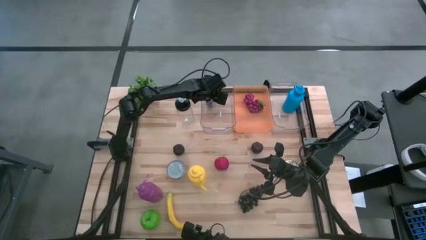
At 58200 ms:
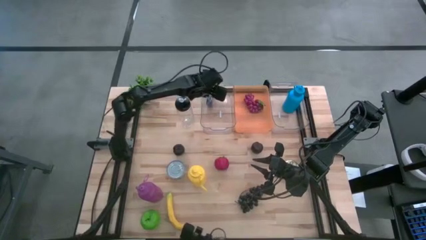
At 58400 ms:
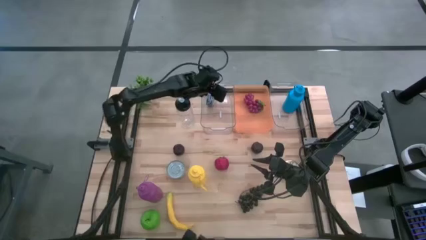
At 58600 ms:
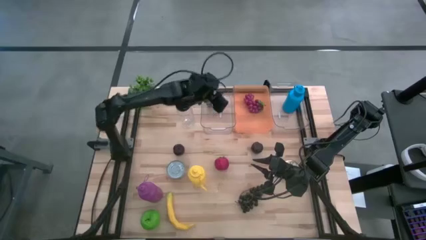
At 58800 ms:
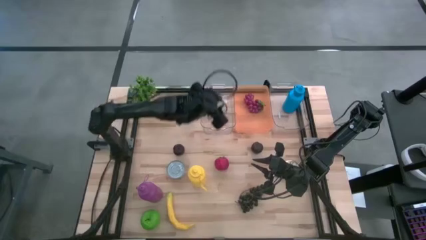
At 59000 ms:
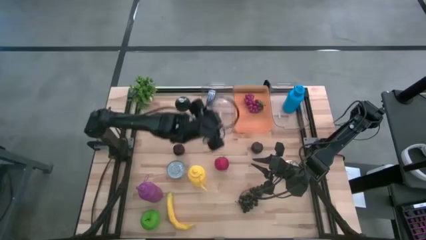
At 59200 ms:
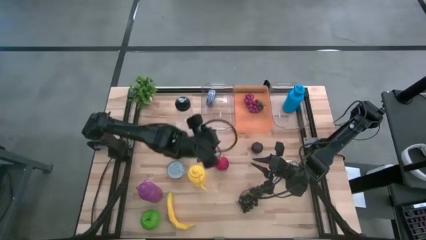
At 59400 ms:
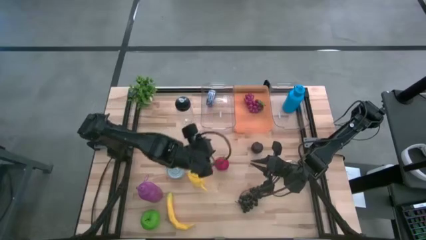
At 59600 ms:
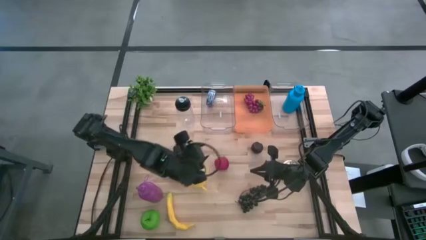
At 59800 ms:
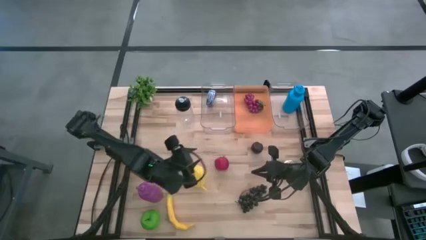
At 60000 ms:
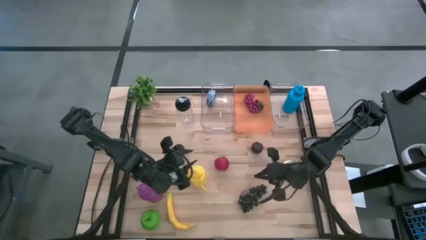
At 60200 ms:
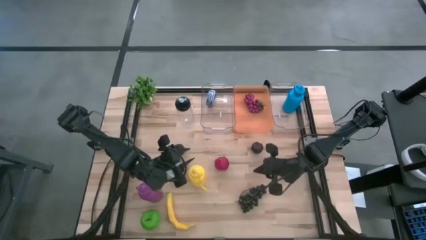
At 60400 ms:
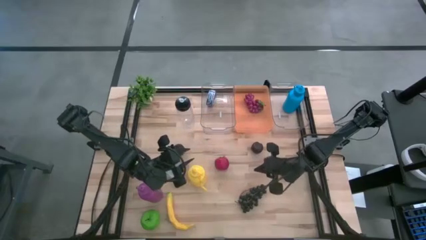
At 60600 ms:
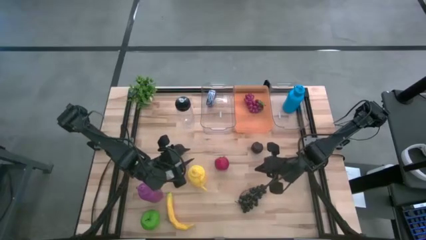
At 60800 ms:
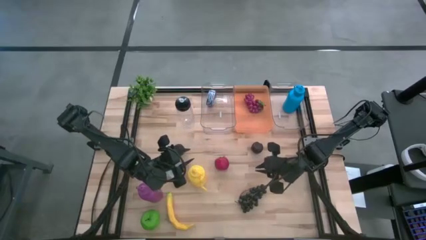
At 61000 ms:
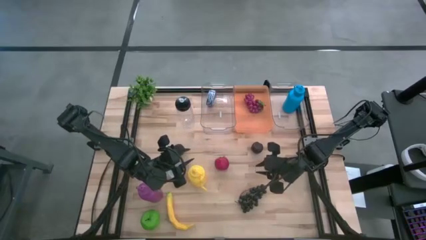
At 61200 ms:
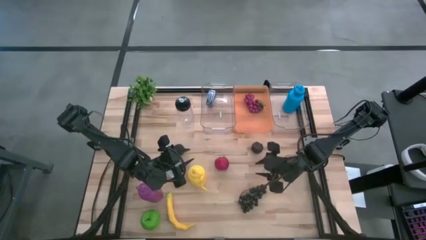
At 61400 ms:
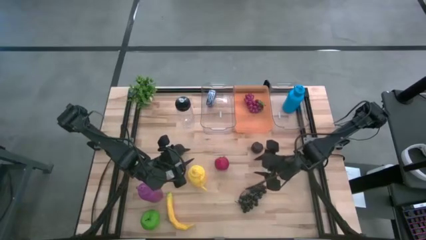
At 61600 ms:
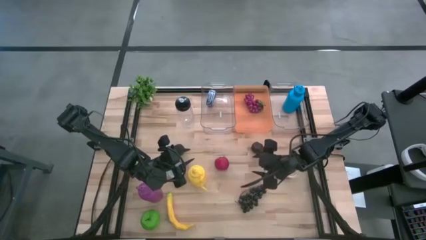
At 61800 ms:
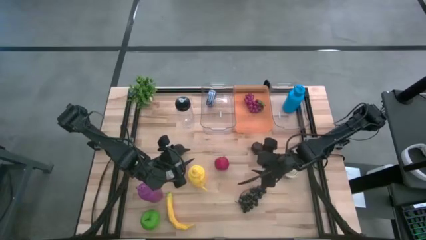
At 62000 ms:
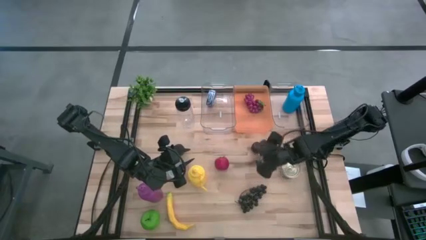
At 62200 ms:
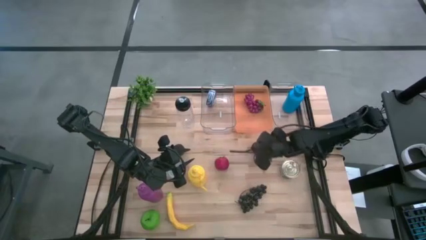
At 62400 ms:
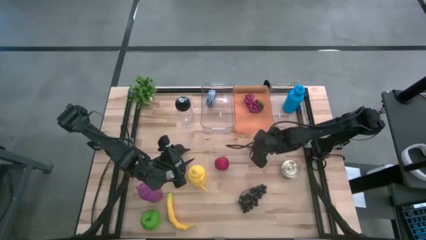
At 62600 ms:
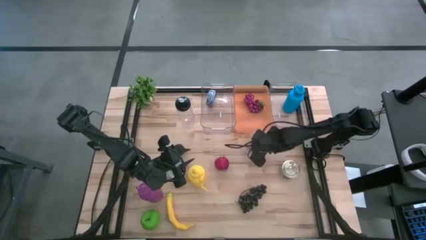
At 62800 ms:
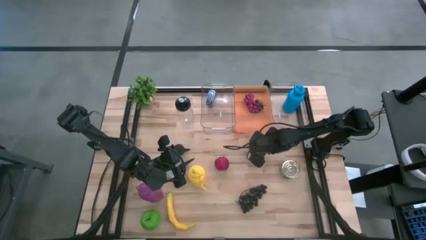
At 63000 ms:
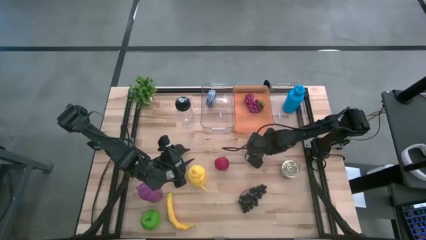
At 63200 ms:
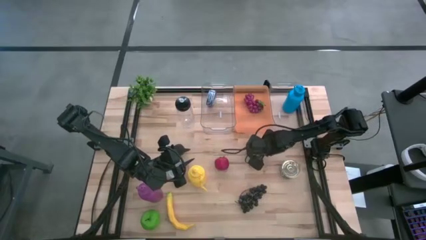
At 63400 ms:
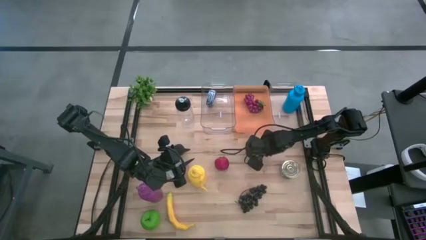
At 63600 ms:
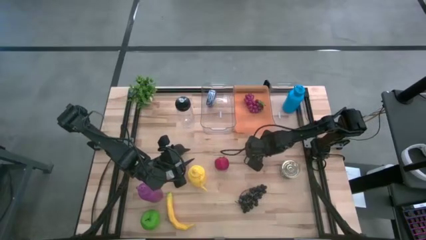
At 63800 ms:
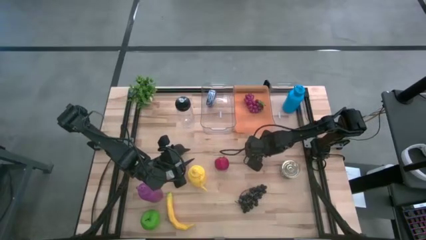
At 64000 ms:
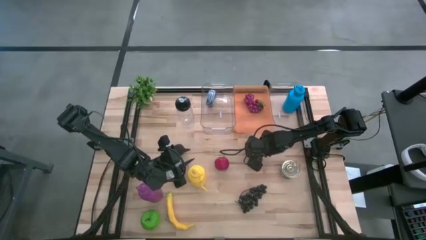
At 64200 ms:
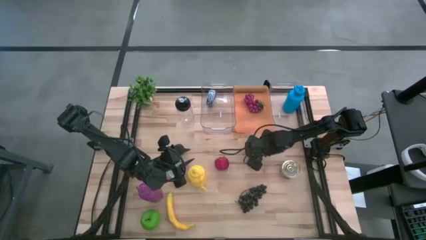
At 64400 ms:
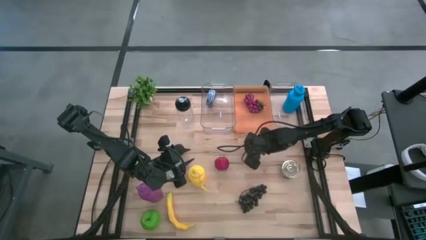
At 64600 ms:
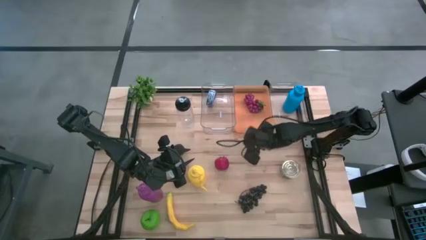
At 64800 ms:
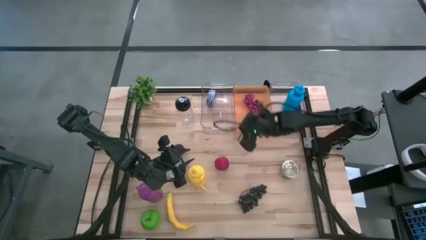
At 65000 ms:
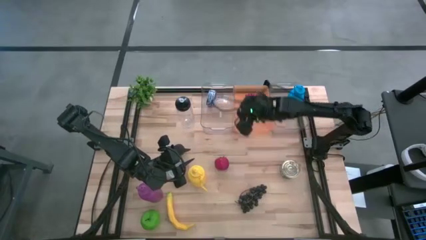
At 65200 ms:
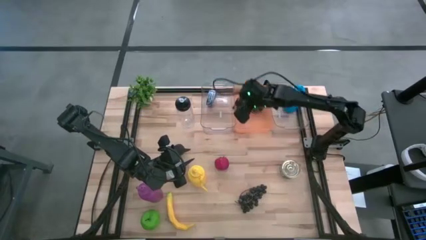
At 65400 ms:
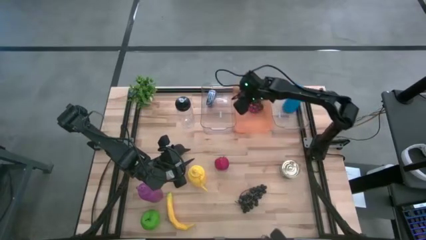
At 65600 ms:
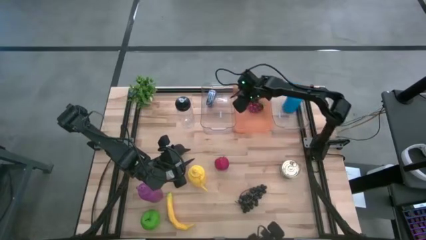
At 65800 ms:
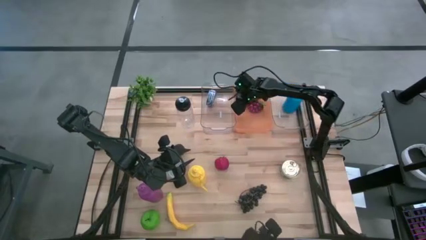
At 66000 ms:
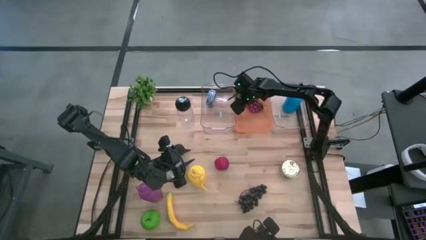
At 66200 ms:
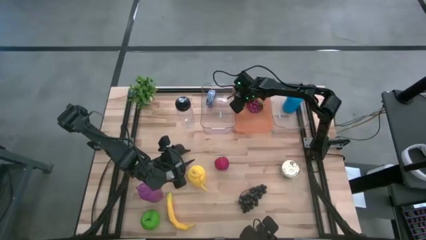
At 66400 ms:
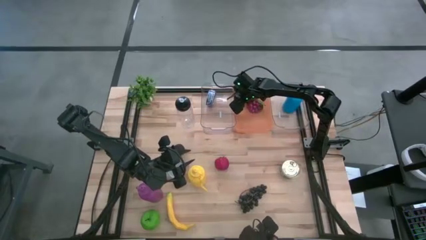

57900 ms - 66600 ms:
Task: Pick & Place Food Item
Put the right black plum into the orange bin

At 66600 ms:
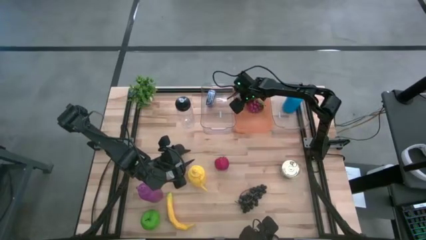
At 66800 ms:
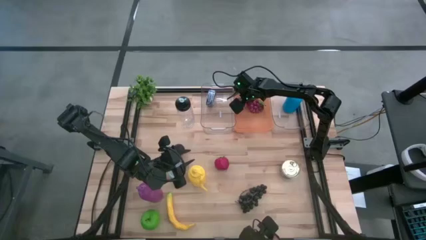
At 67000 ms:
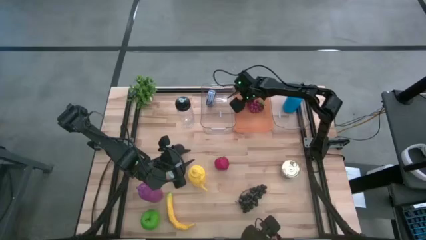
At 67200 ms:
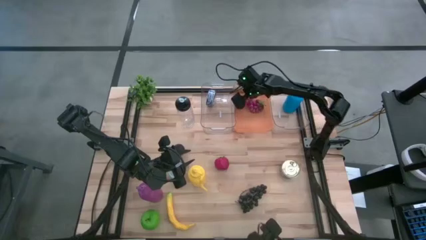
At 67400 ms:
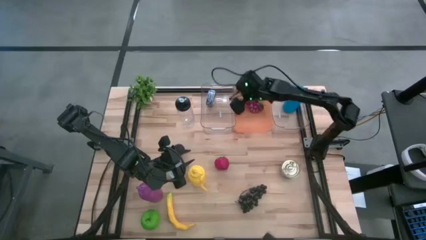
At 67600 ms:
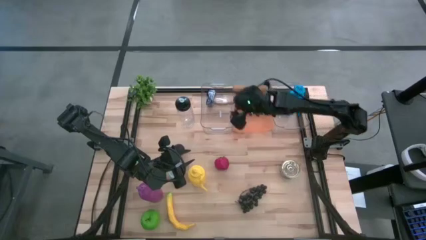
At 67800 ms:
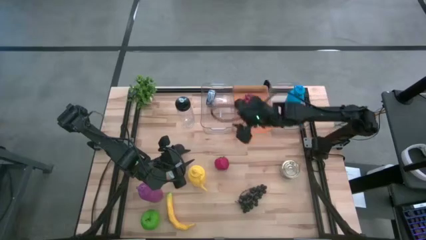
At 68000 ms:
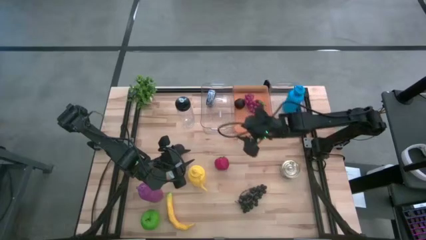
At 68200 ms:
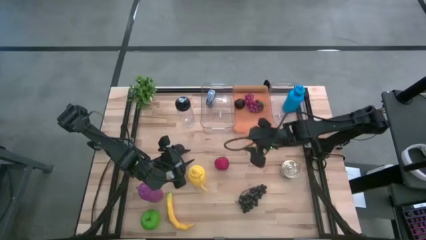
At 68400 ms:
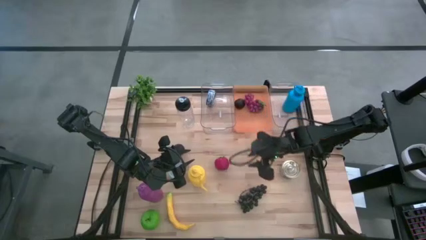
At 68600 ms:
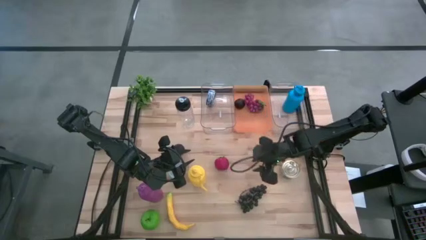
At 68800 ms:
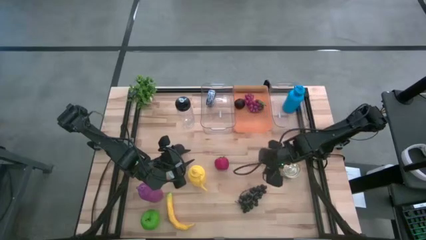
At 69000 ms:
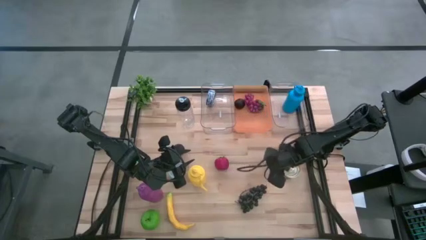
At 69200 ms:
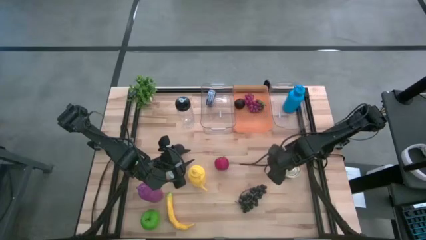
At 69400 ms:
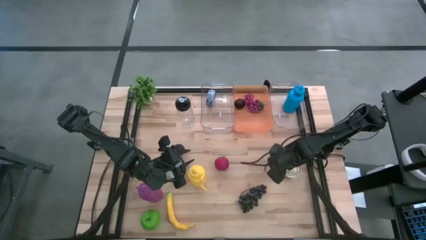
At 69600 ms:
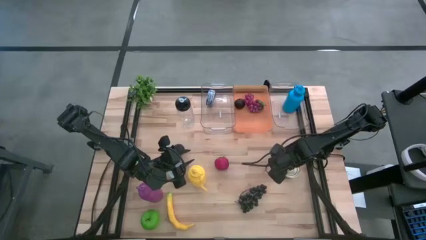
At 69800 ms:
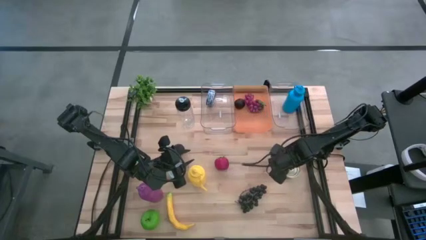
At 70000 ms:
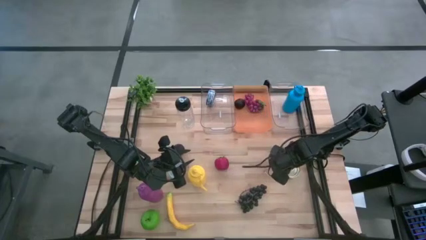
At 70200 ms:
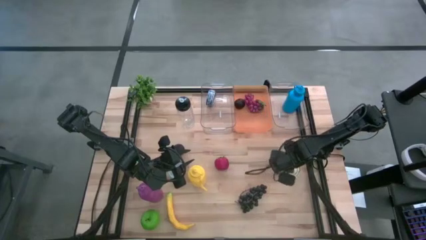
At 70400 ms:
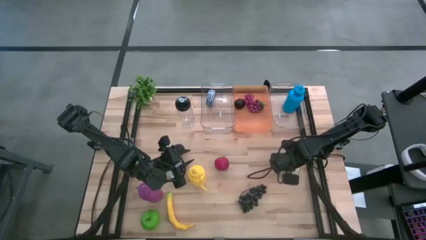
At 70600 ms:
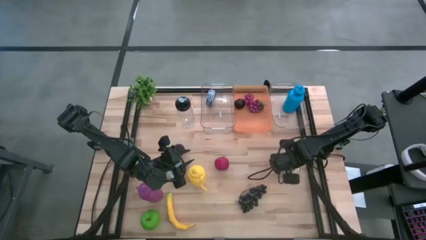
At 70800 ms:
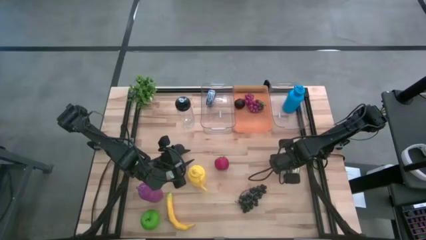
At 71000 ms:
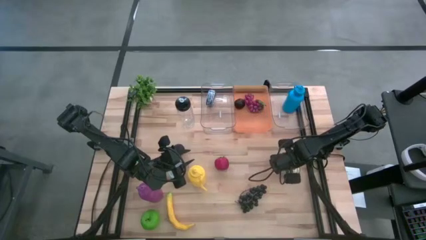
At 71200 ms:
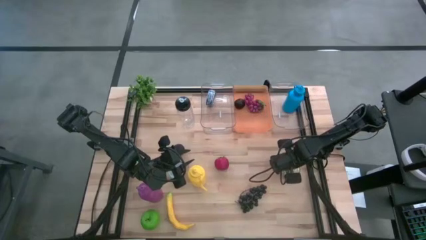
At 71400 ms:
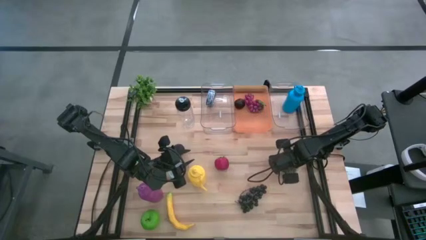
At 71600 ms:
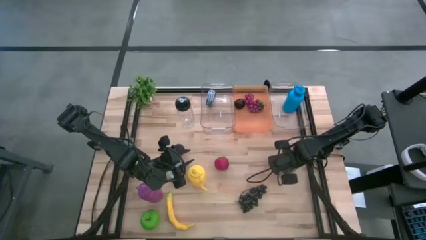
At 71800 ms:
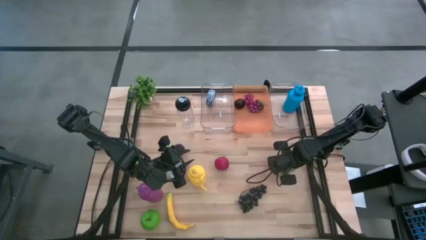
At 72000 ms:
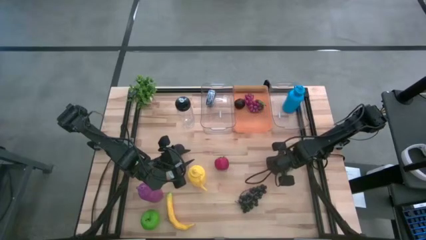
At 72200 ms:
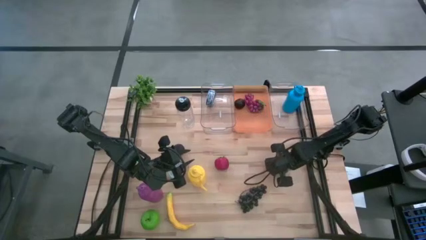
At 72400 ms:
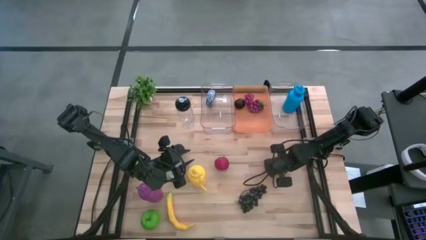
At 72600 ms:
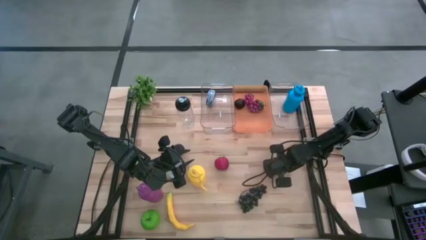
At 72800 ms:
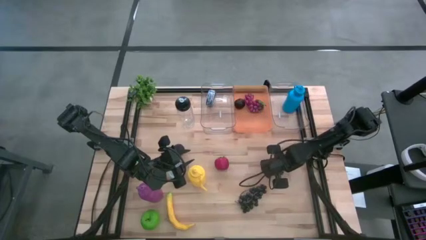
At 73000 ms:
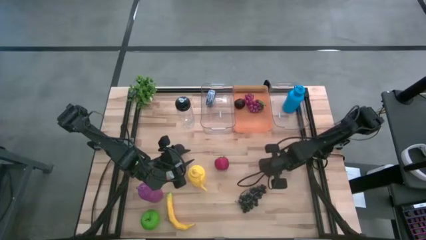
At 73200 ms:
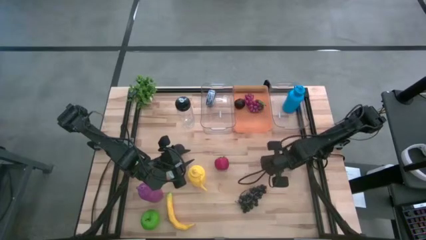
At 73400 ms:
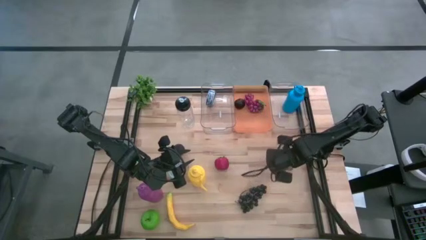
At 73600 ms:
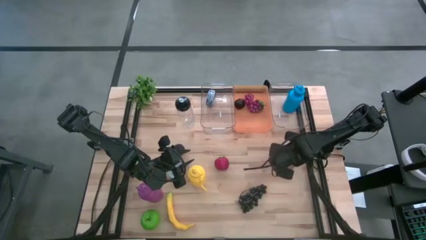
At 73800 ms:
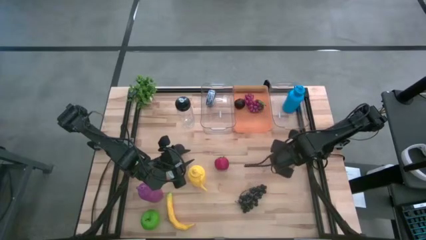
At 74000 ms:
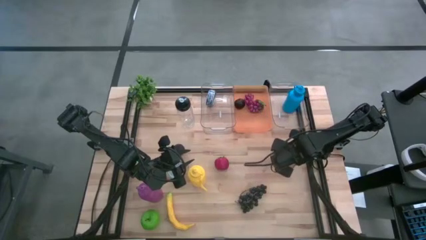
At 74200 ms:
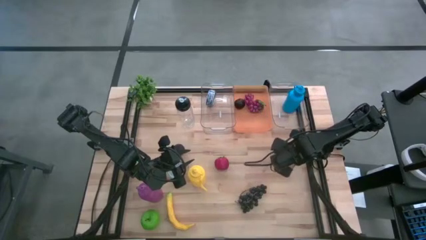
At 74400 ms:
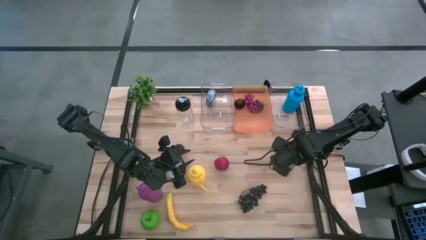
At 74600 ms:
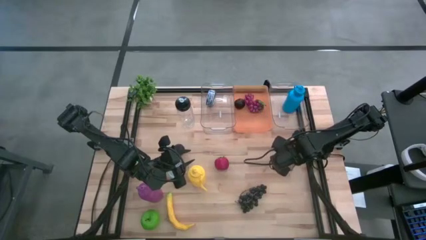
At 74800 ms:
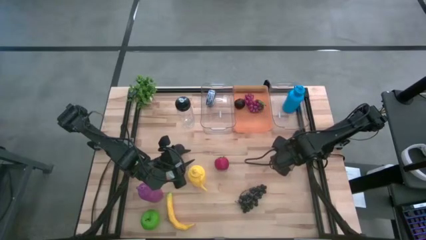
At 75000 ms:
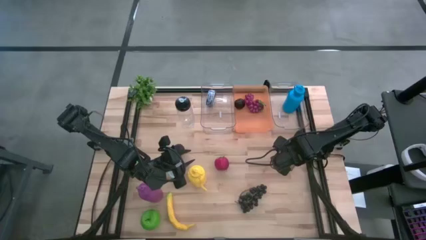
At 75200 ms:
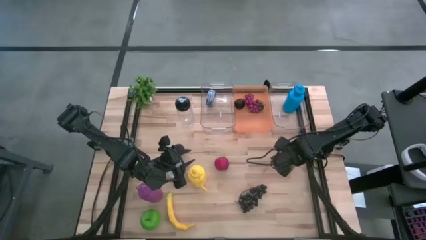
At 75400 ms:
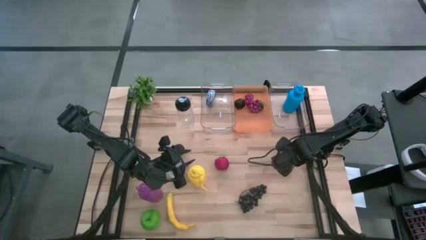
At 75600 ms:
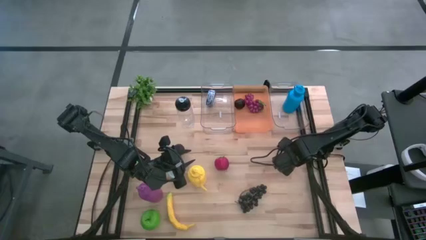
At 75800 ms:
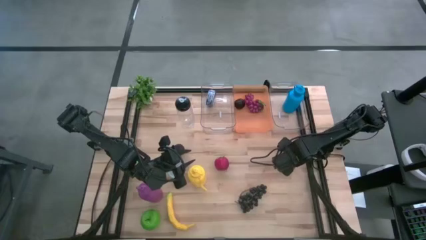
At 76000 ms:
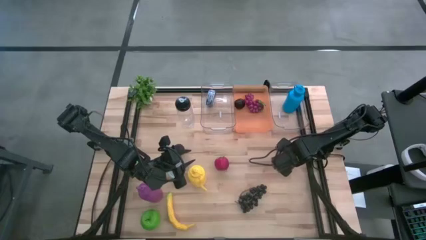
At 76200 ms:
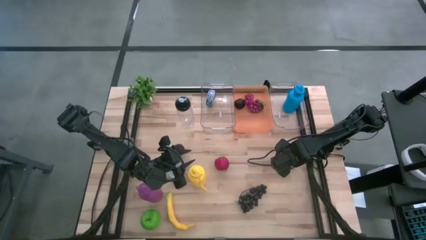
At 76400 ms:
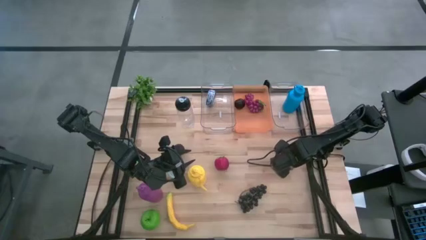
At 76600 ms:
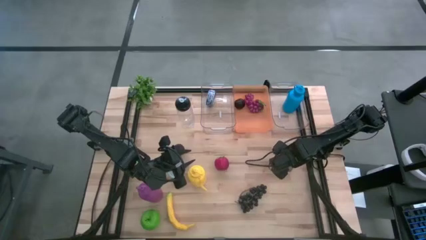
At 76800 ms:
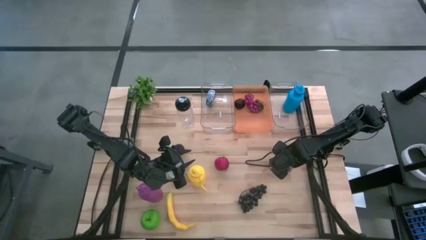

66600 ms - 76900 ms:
Put the blue and pink tuna can into the left transparent bin
